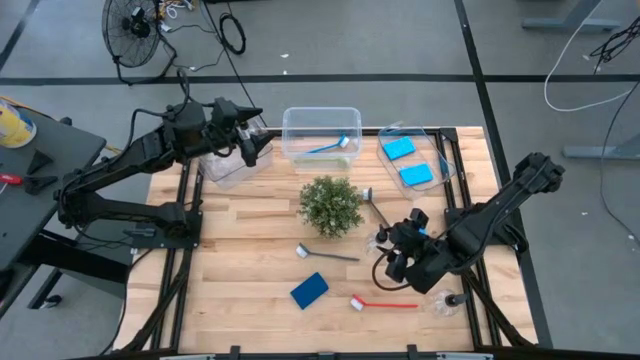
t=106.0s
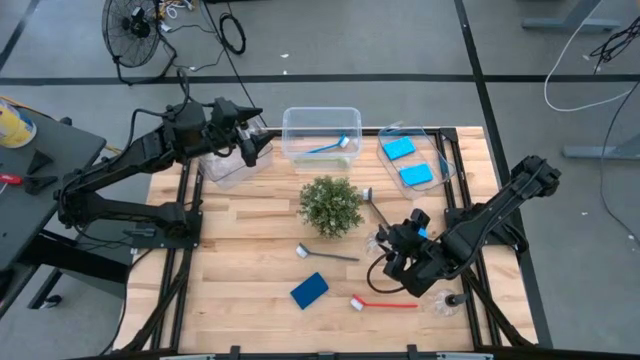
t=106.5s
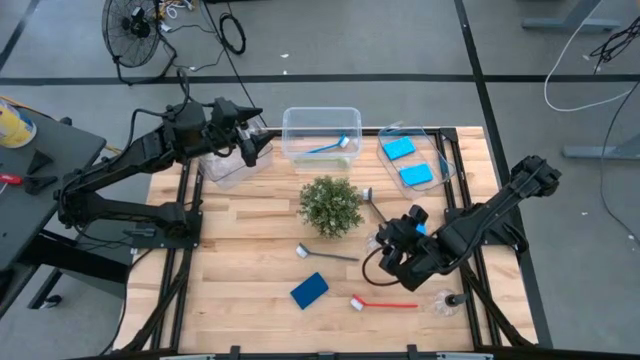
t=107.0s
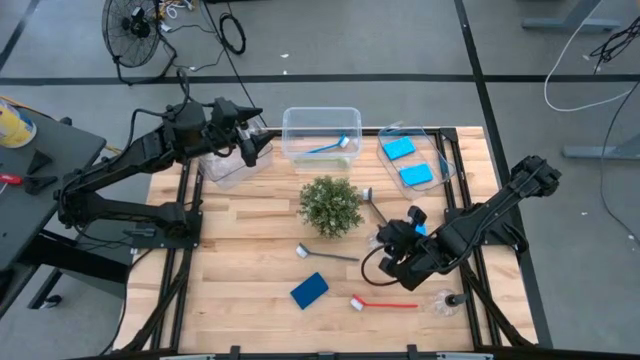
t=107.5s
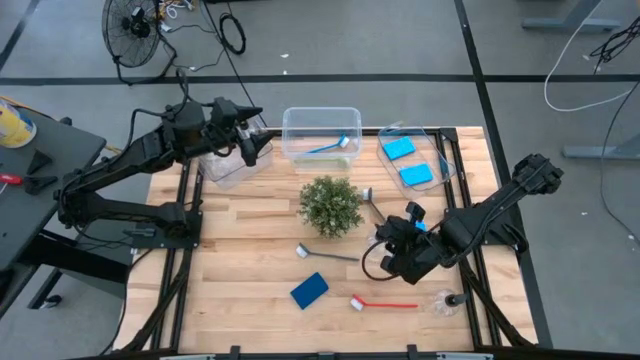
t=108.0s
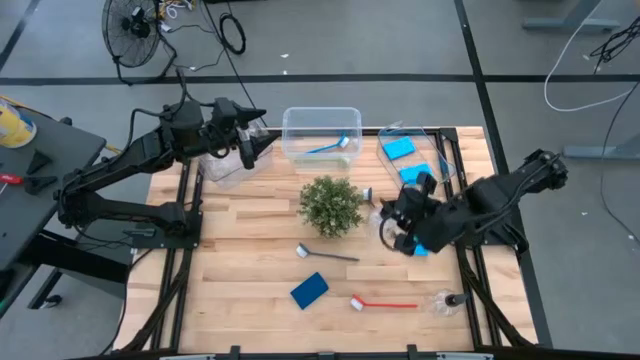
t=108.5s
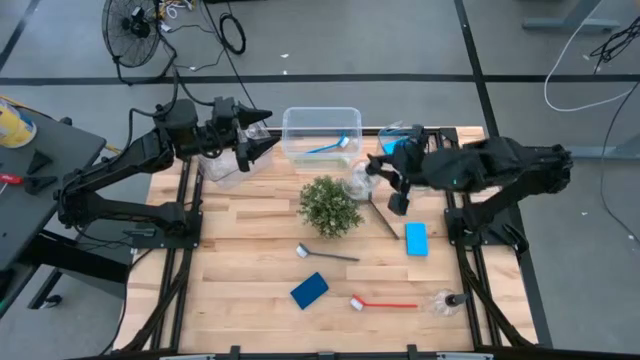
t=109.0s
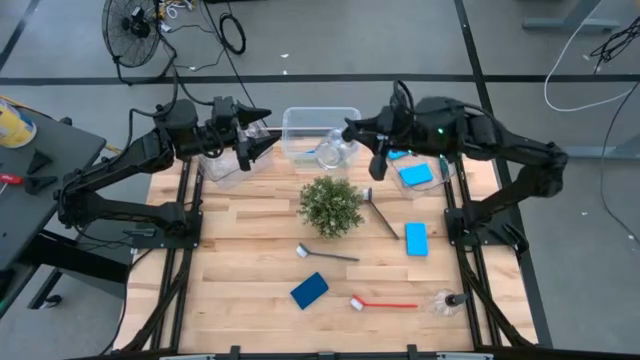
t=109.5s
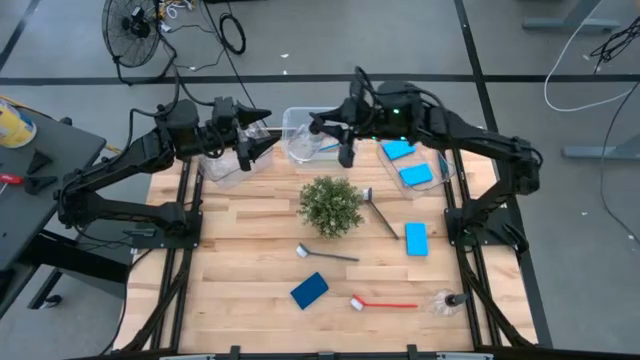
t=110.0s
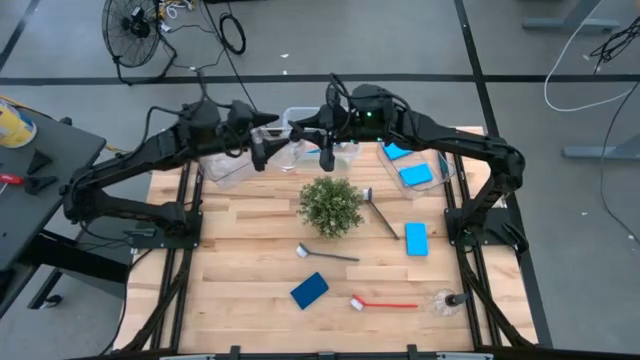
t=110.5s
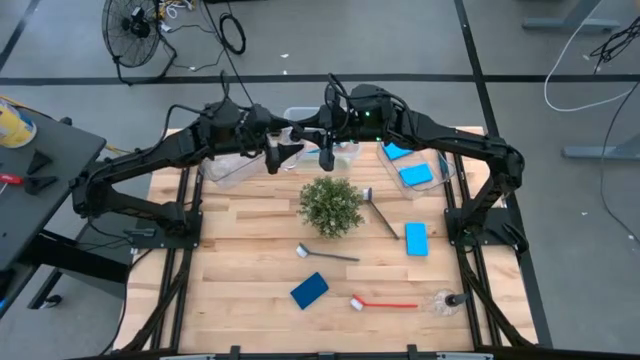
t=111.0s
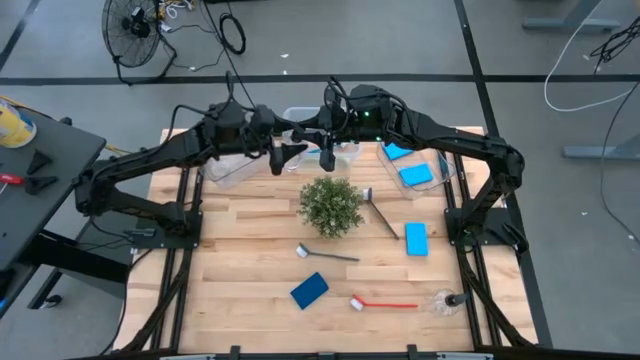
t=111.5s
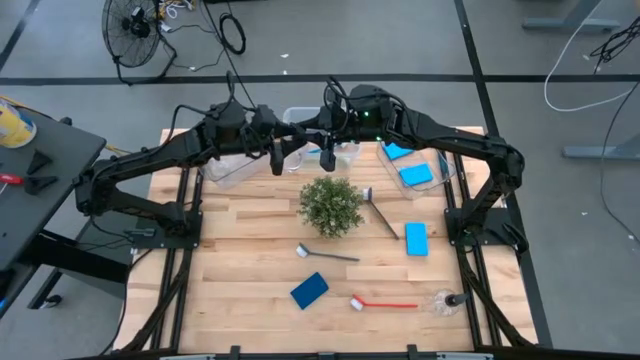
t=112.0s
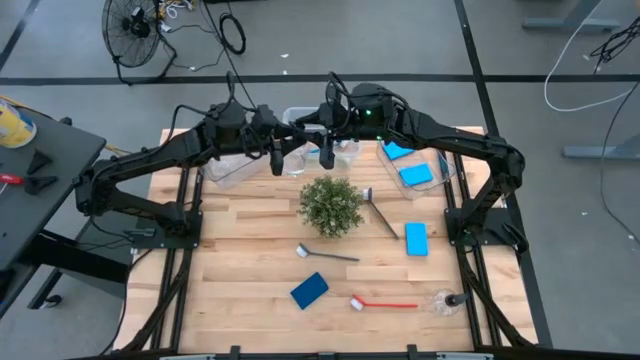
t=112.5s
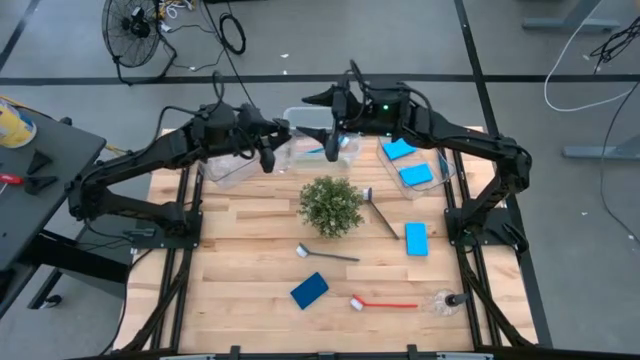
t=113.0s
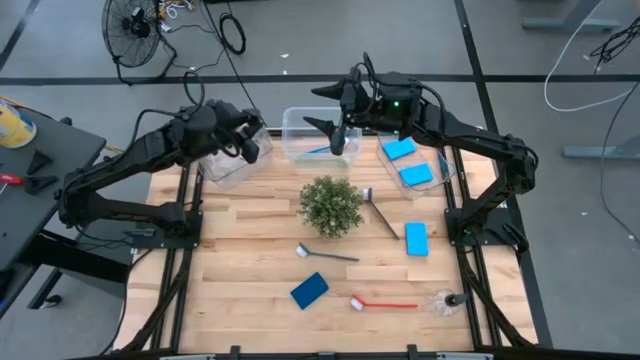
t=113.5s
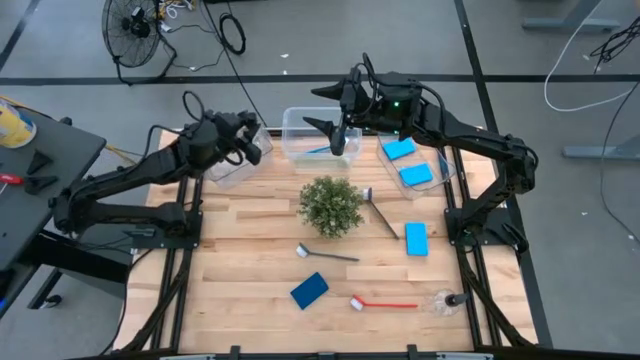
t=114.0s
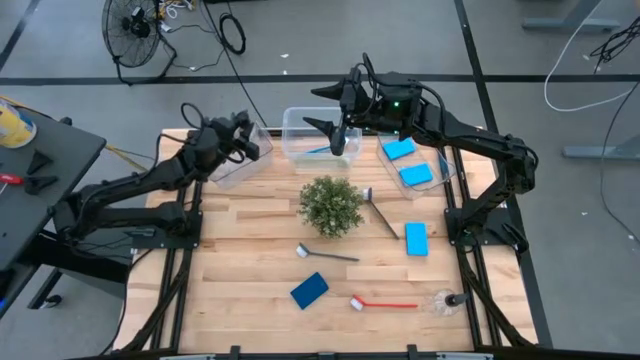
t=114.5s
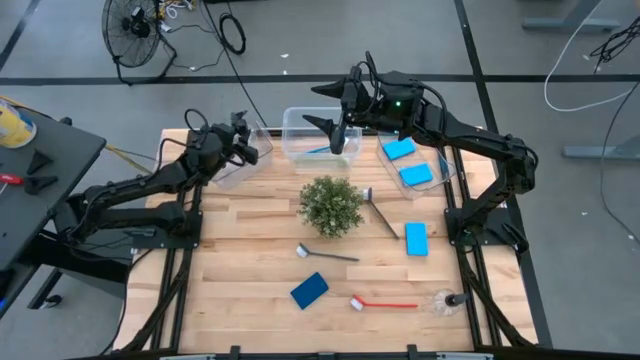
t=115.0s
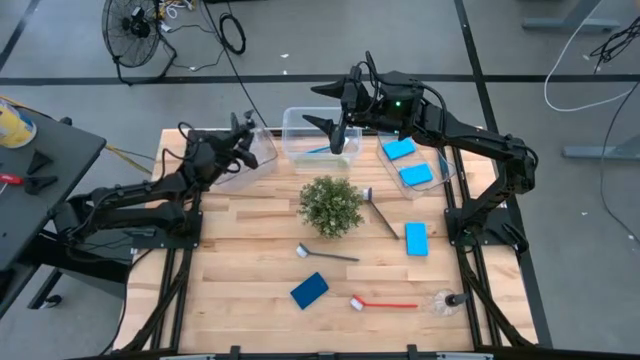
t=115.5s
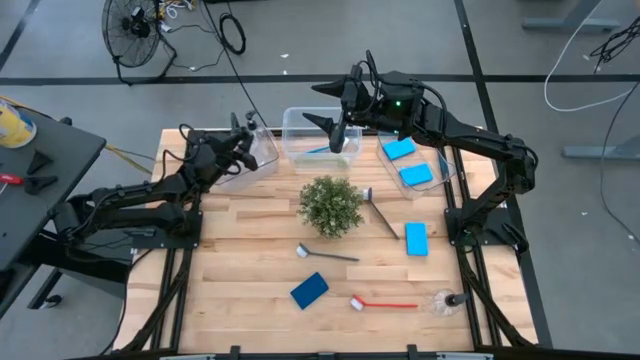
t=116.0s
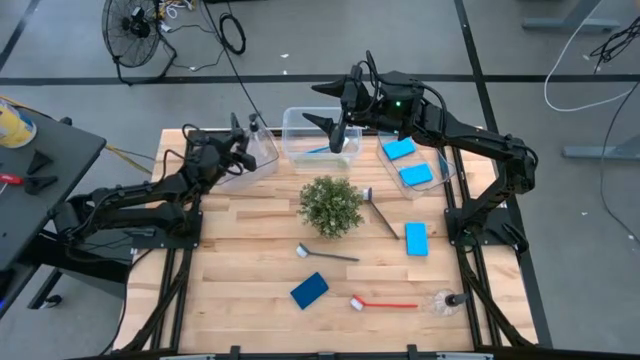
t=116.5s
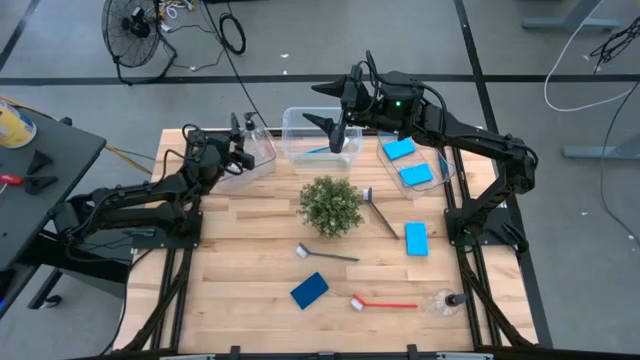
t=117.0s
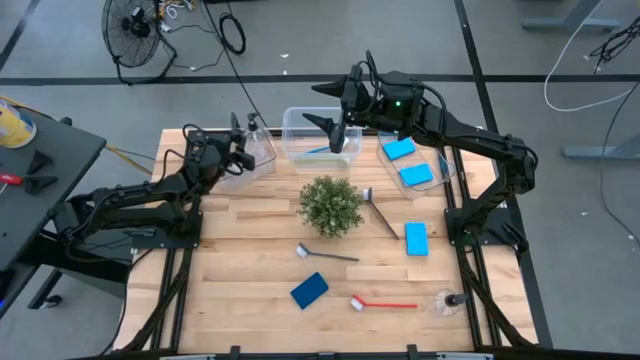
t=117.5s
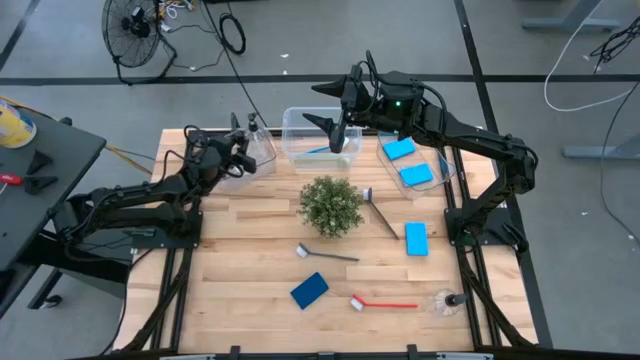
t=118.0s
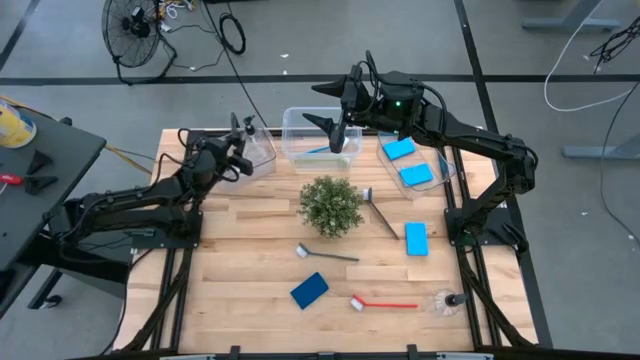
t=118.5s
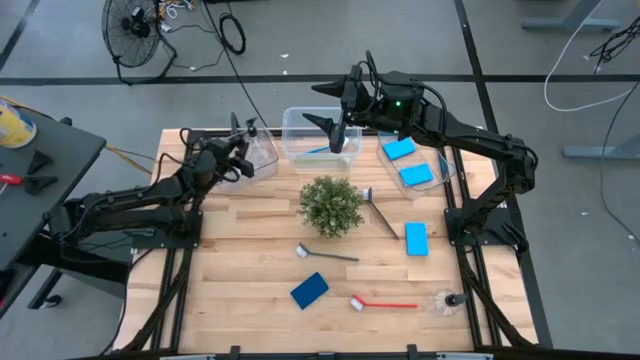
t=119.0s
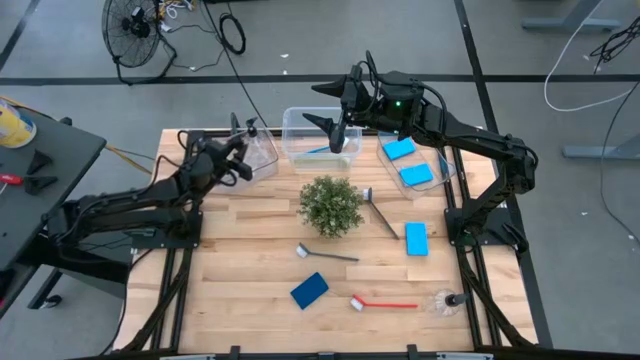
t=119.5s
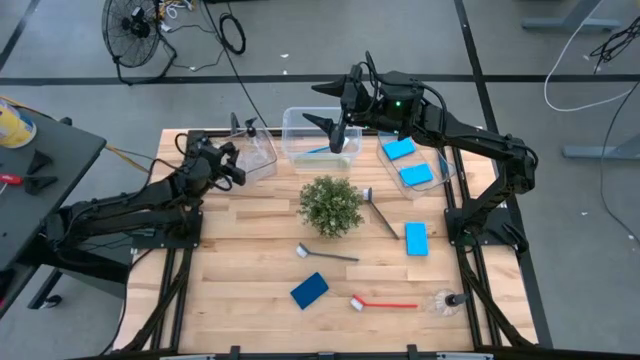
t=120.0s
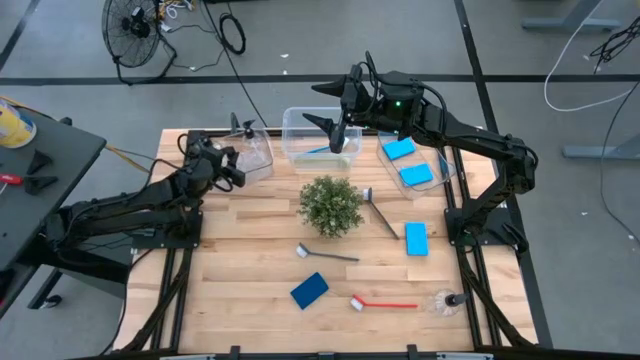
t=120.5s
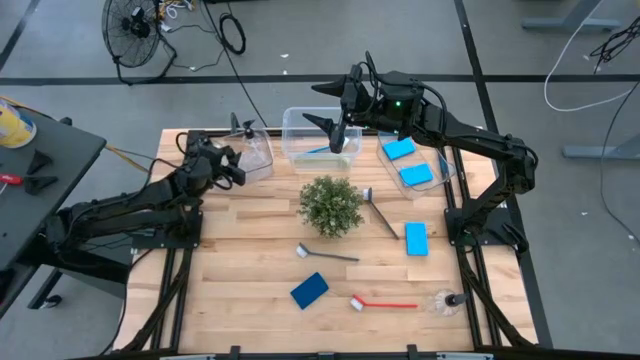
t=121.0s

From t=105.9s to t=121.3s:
Task: Pick & Place Kitchen Sink Supplies
Put the transparent soap dispenser into the left transparent bin
